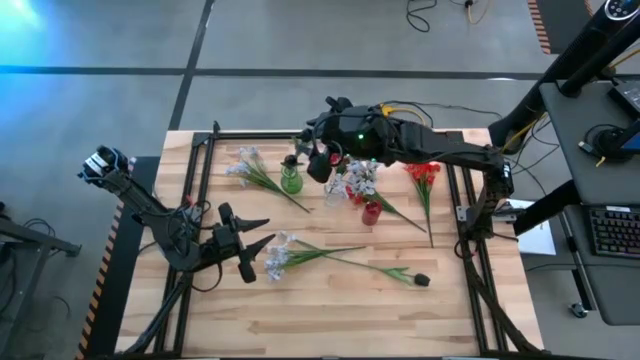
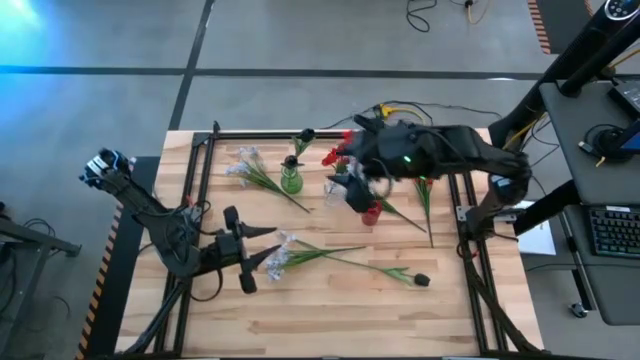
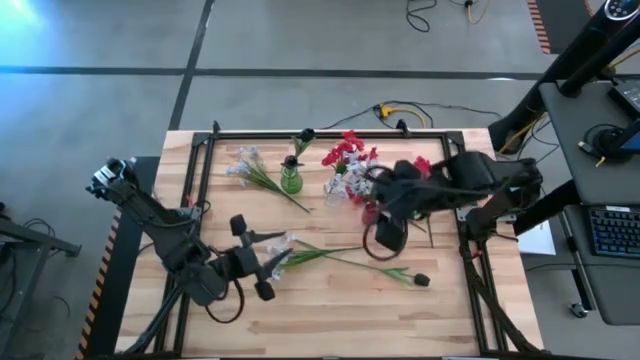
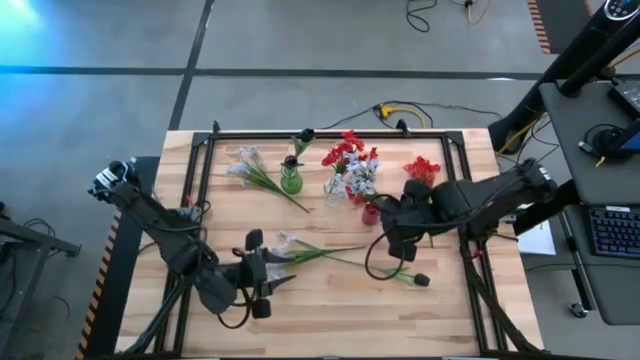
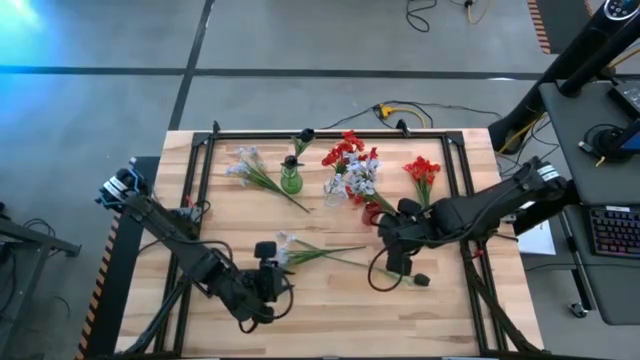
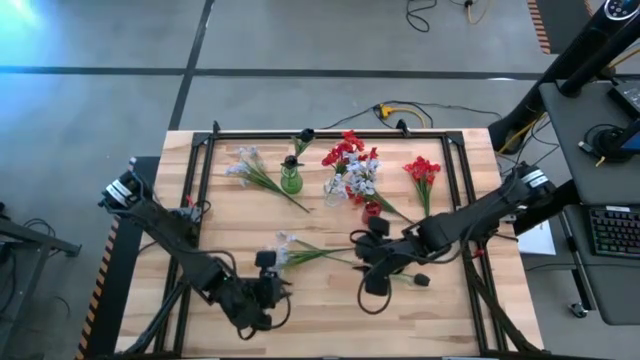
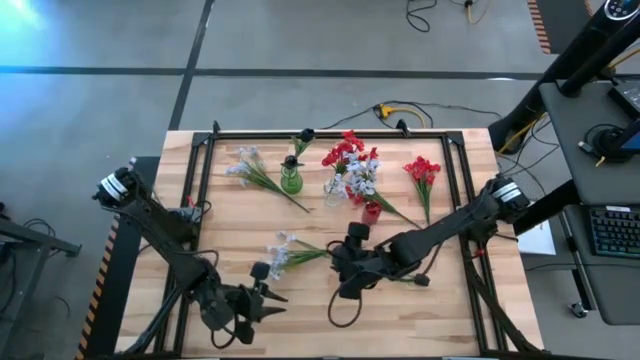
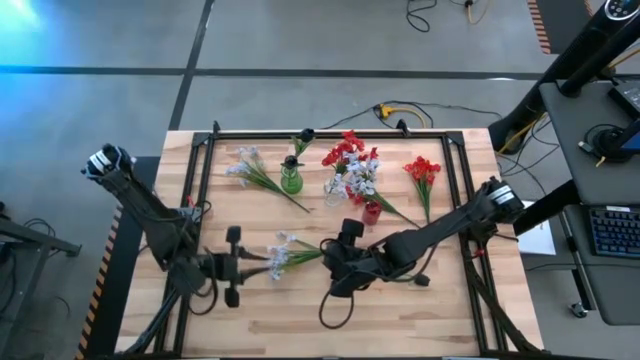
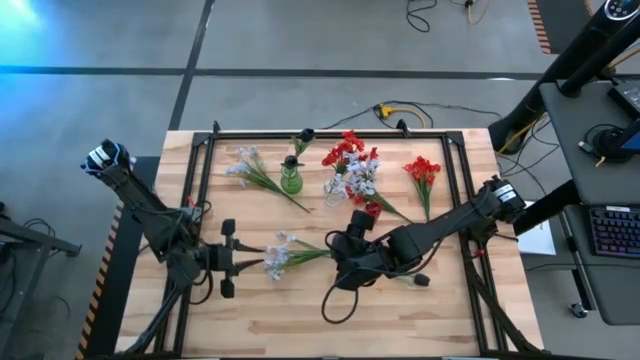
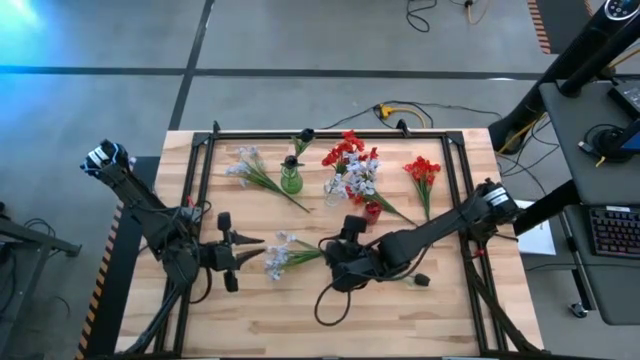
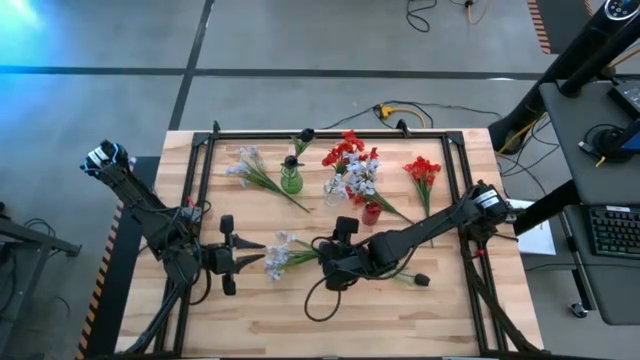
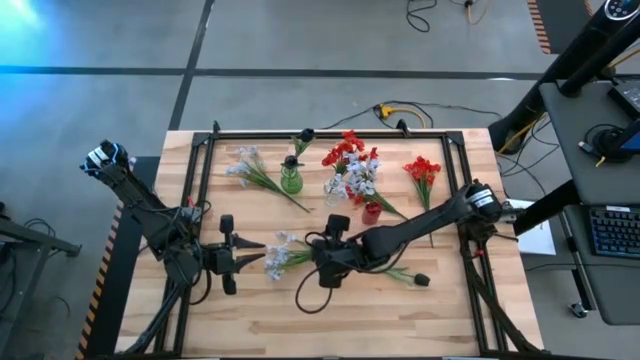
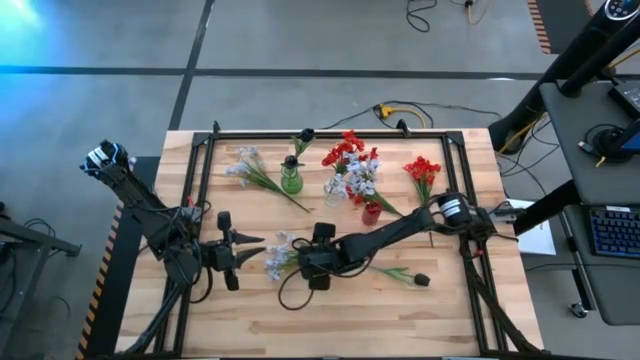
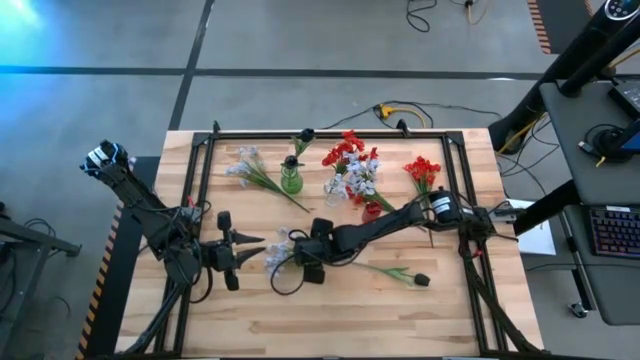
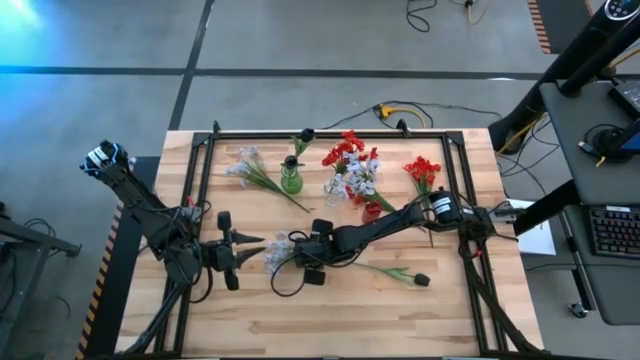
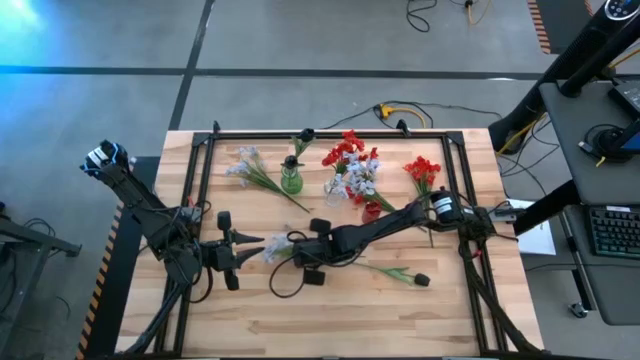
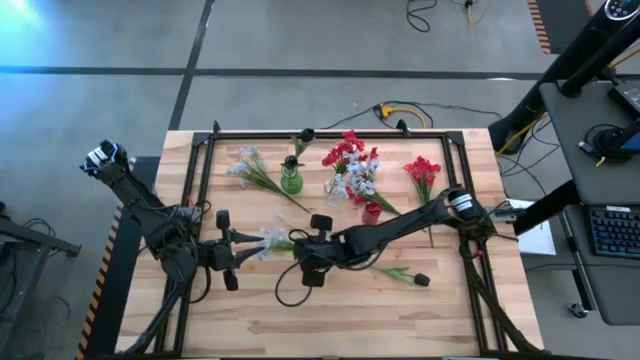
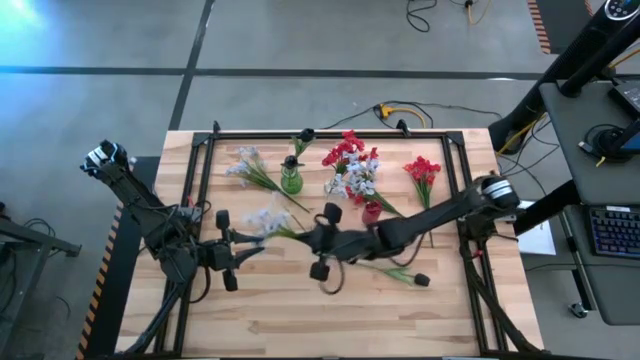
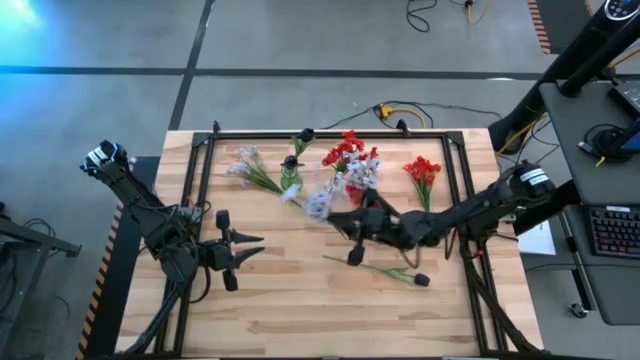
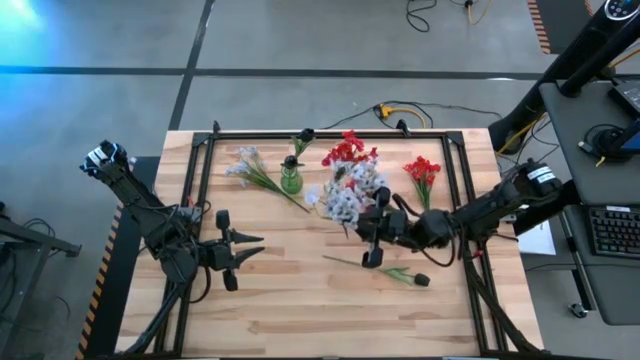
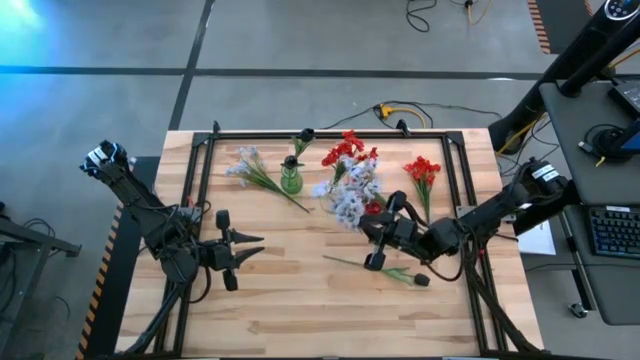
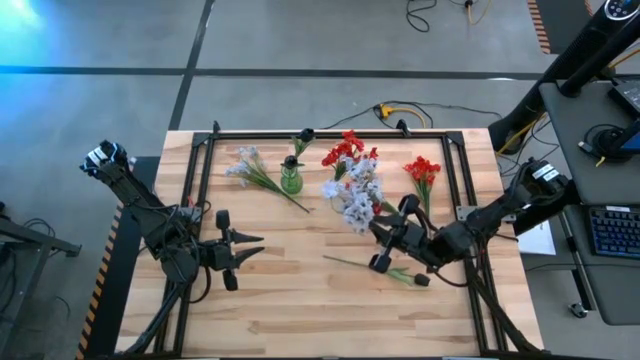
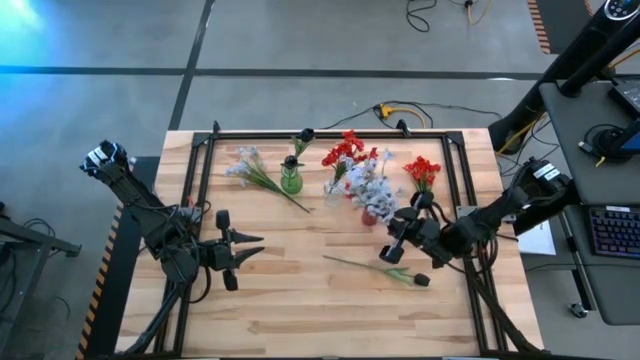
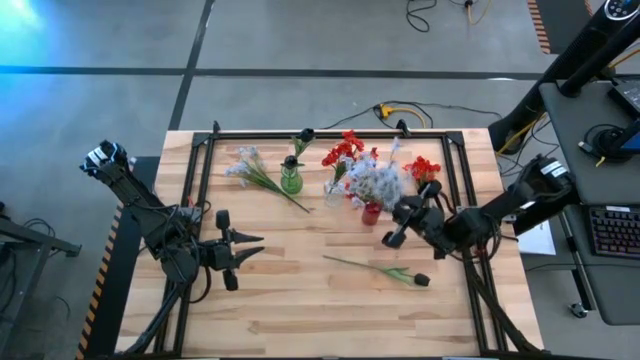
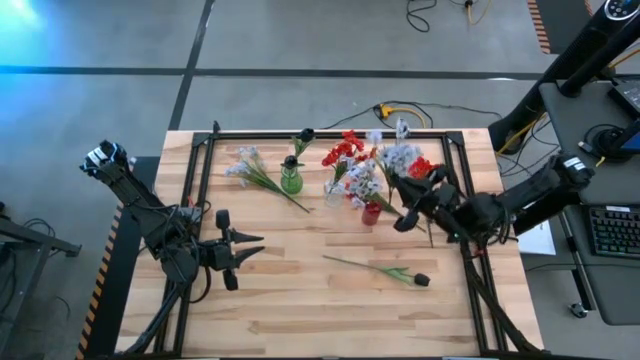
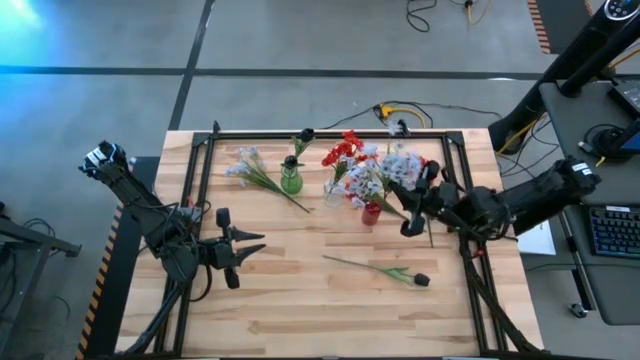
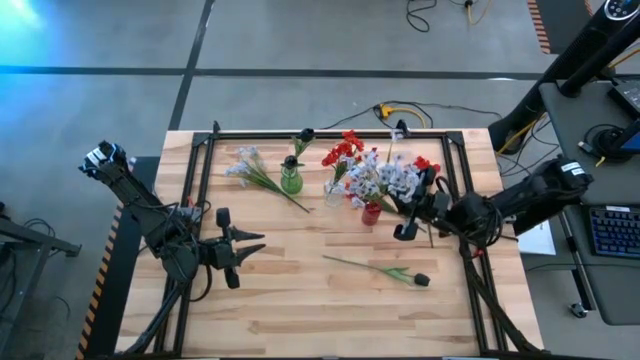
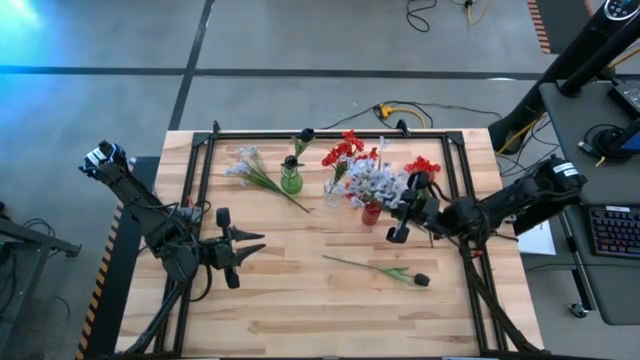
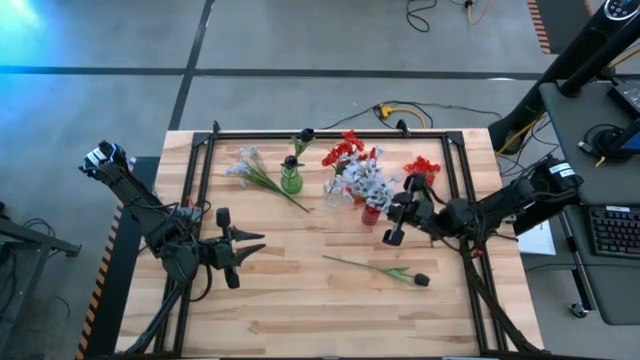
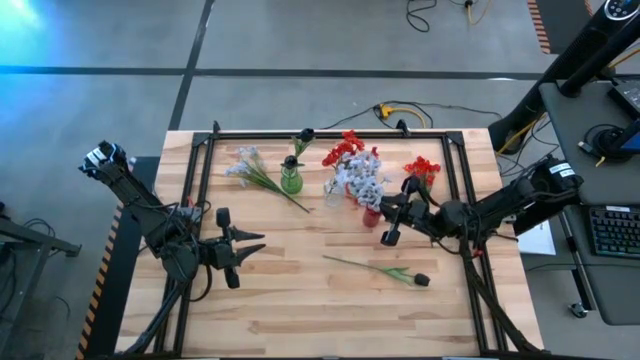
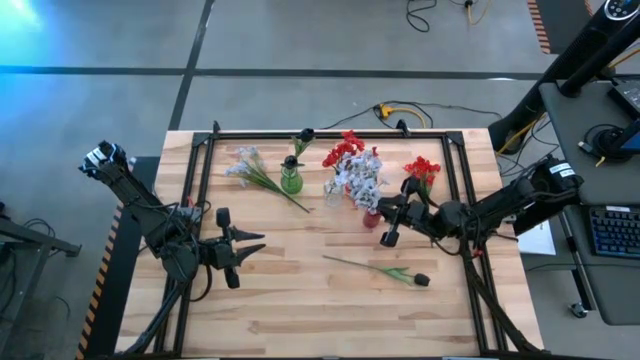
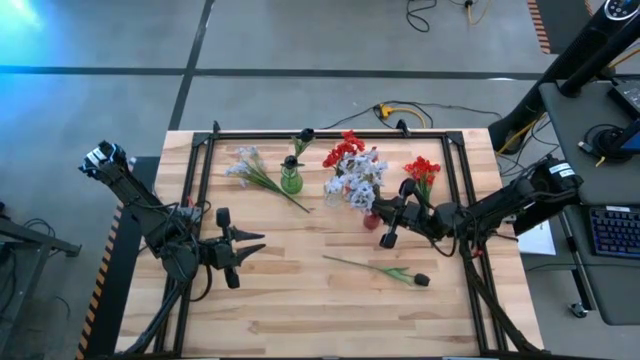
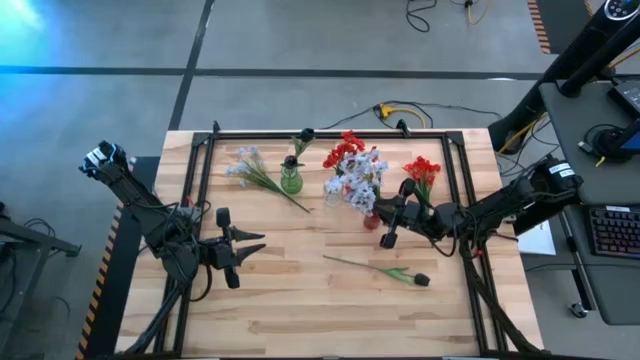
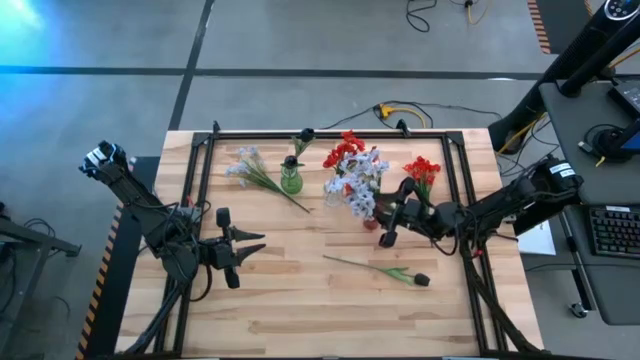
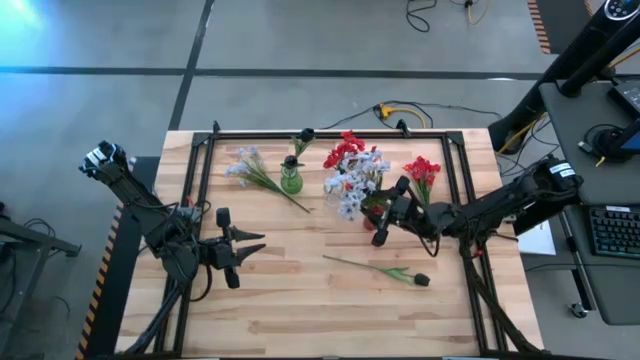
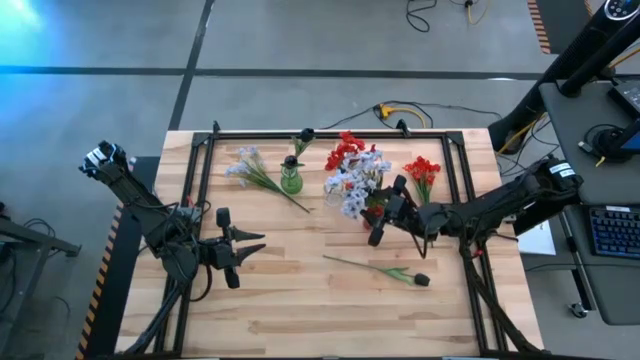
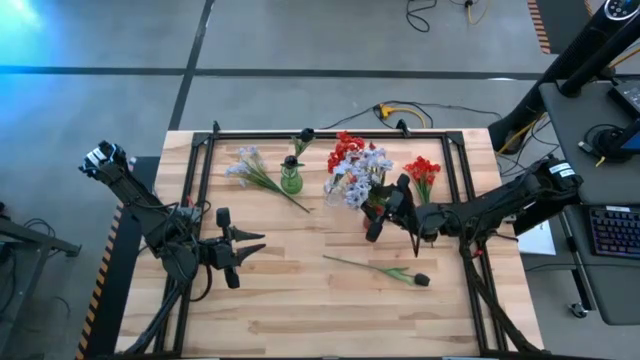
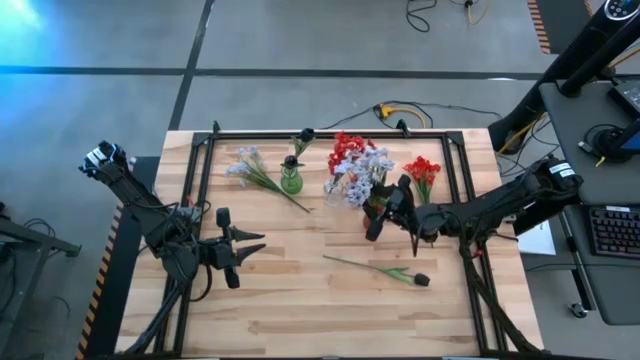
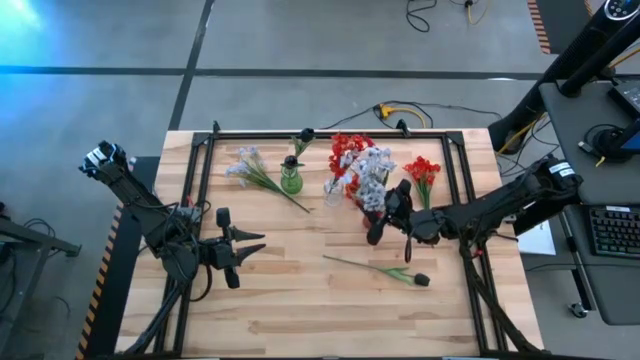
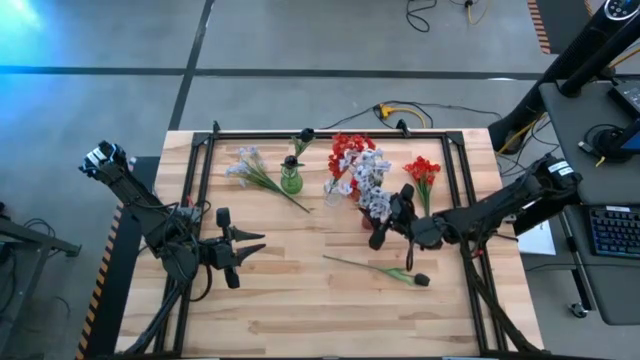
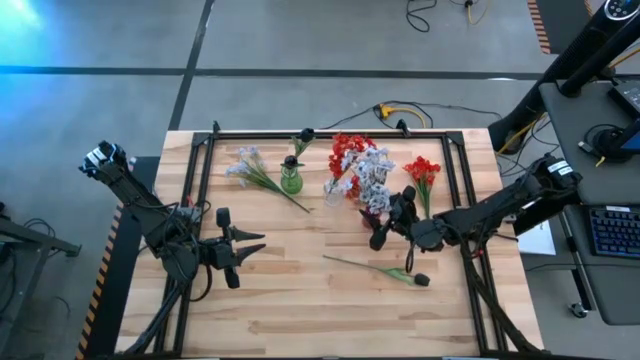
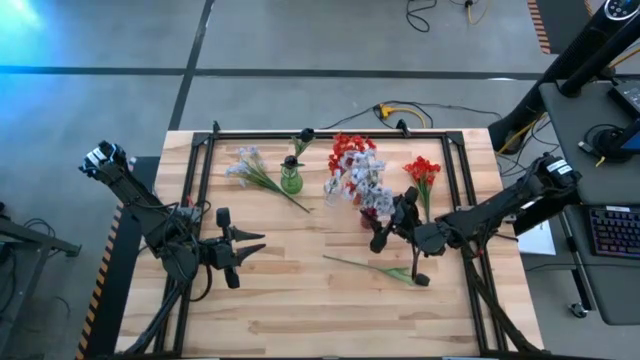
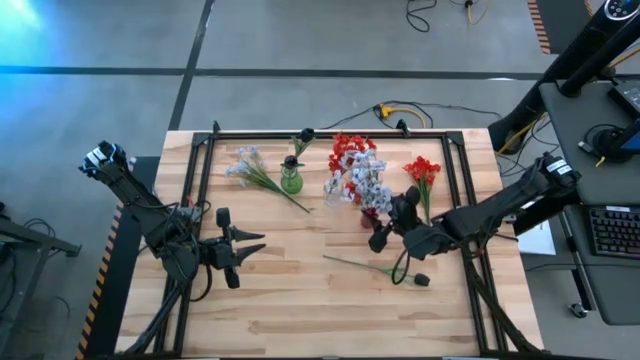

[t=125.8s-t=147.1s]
Task: Sort flowers into vase by color
Put the bottom white flowers into the red vase
